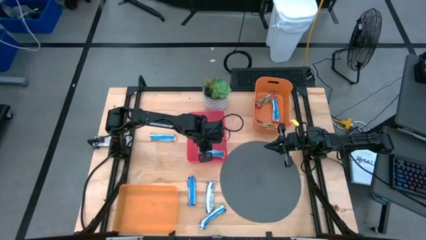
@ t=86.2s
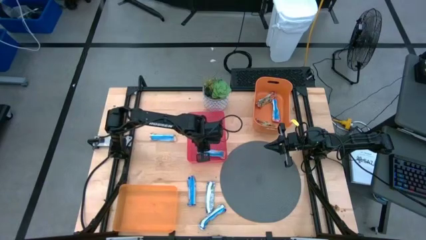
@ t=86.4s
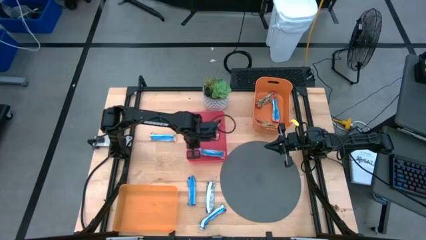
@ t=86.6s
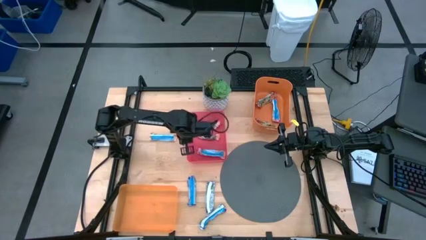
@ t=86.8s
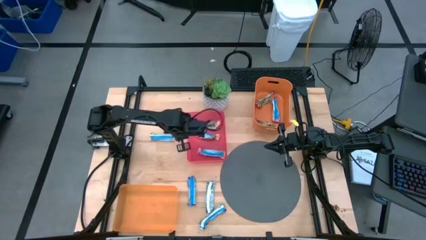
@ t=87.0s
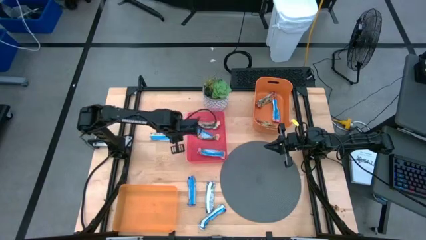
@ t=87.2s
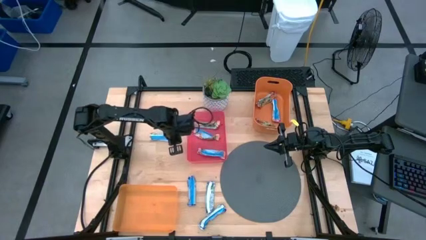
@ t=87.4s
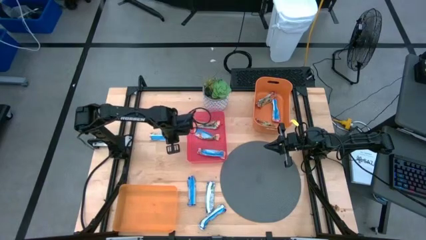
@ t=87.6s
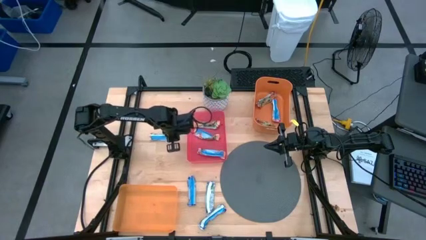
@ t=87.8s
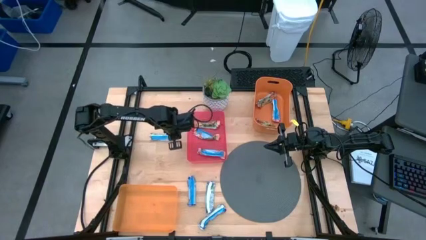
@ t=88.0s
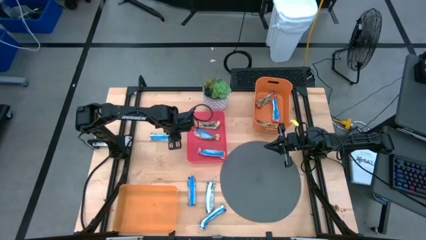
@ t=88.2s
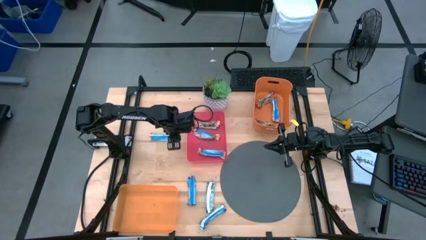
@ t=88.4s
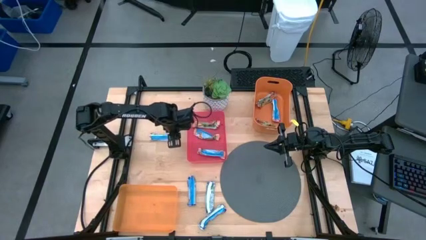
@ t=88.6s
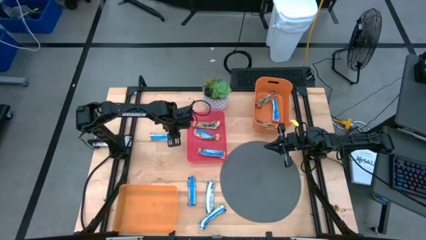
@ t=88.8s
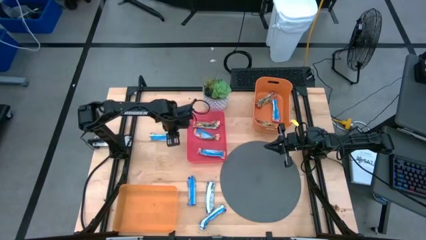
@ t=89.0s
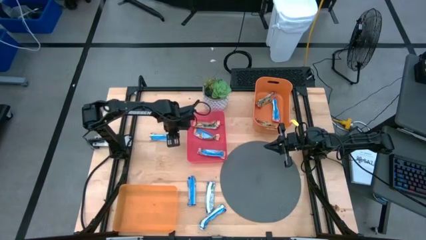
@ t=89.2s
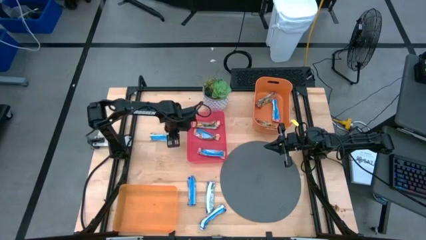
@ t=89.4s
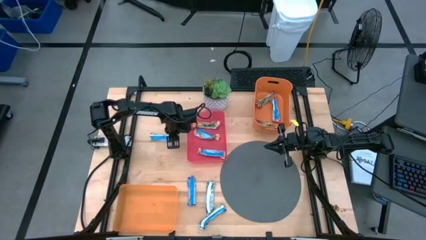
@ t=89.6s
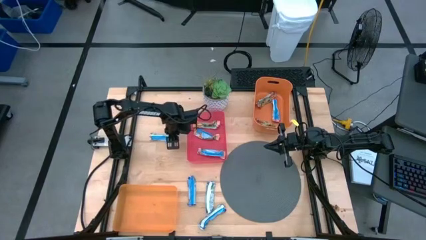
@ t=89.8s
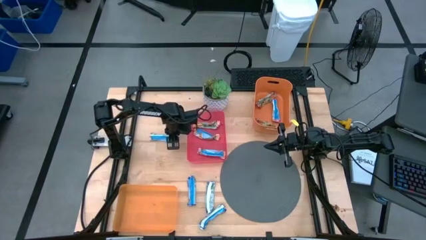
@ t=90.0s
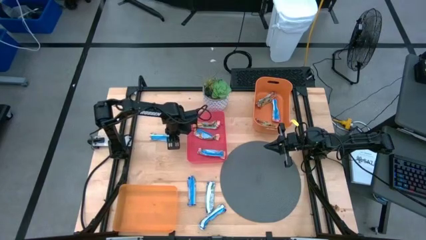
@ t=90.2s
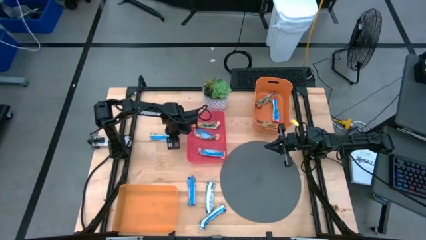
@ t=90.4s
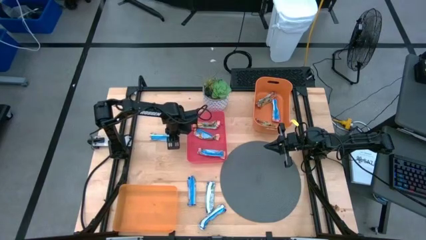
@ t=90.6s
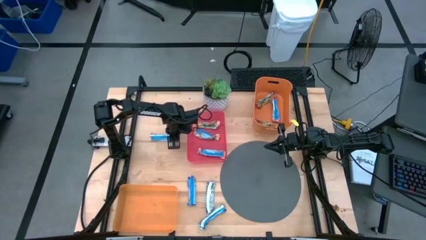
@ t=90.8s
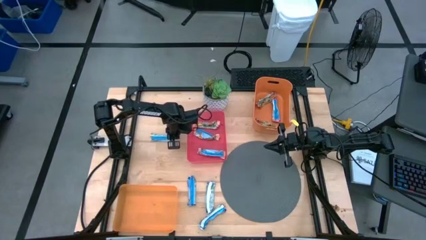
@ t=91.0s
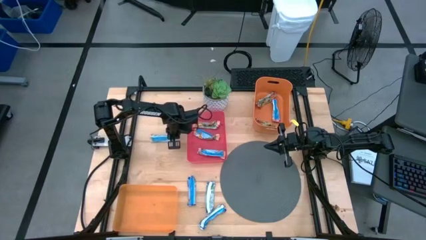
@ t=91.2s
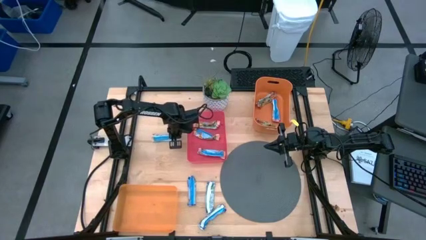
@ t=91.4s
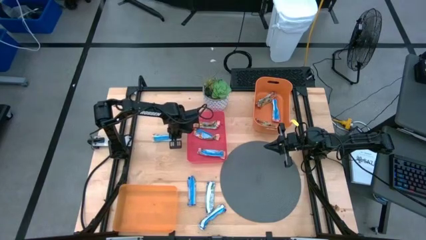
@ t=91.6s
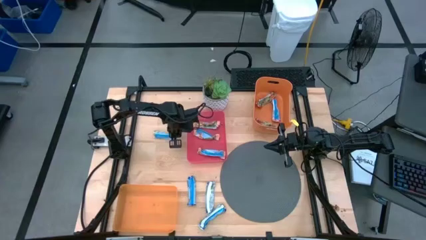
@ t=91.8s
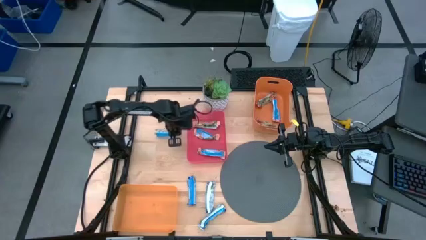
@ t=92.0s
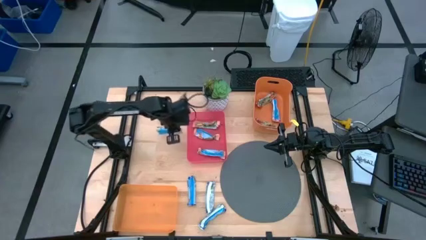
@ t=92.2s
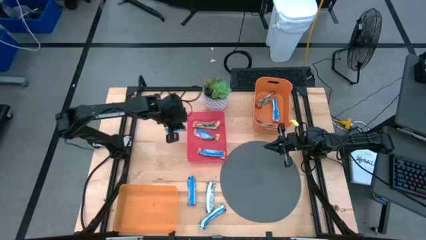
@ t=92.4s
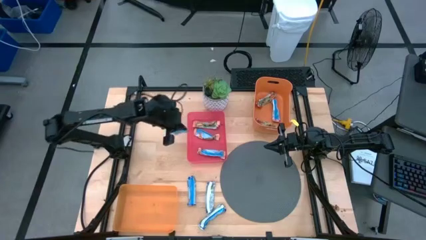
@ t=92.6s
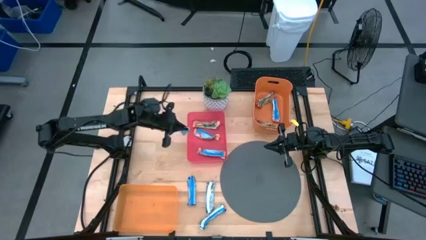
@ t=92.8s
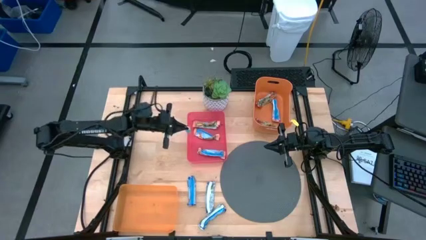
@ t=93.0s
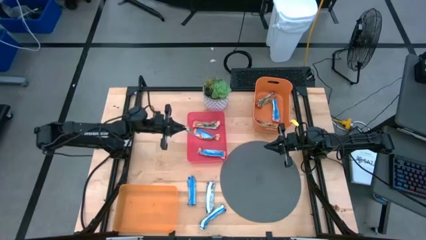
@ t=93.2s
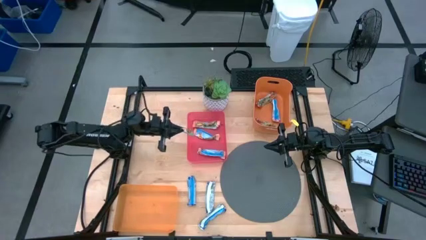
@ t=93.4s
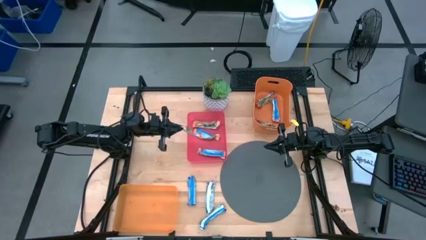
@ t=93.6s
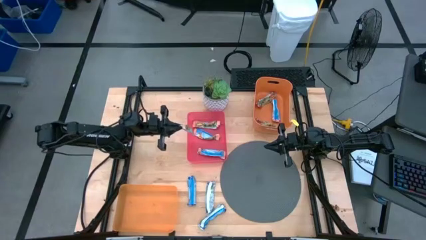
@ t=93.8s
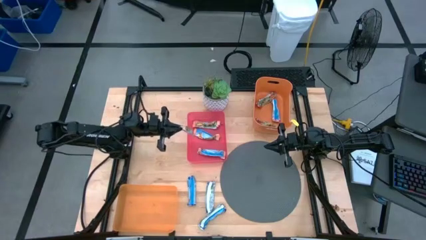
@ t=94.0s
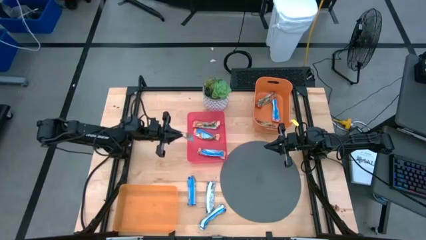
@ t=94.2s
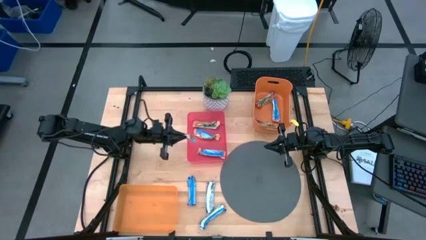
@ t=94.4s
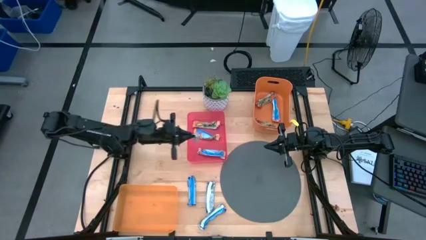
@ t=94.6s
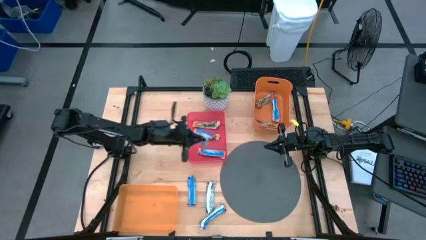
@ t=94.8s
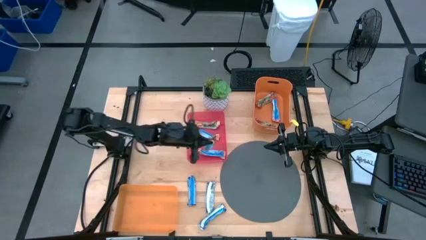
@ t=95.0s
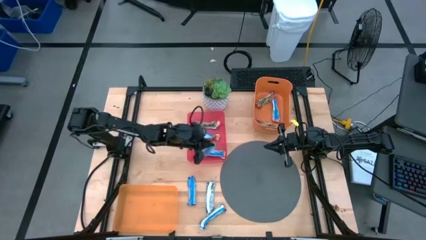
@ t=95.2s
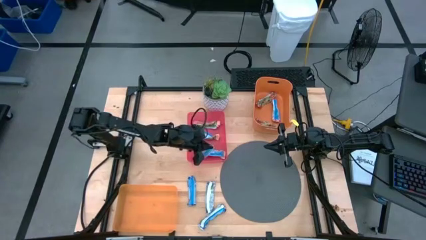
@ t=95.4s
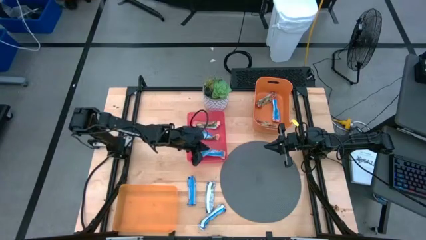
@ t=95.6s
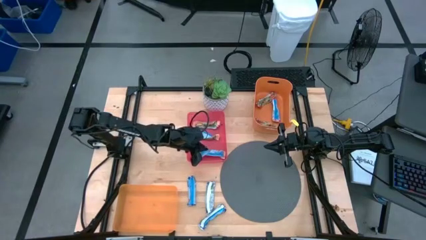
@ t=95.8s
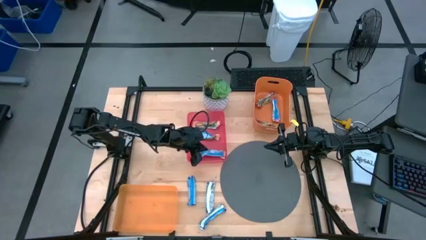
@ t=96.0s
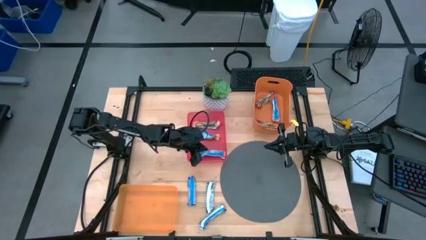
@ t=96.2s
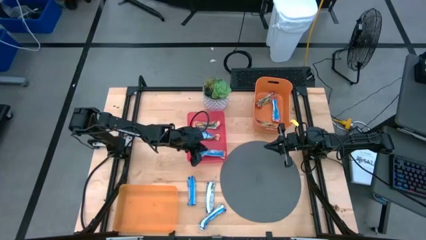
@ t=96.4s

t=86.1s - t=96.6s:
Task: Pick and place Granola Bars by type
Put the blue/orange granola bar into the pink bin

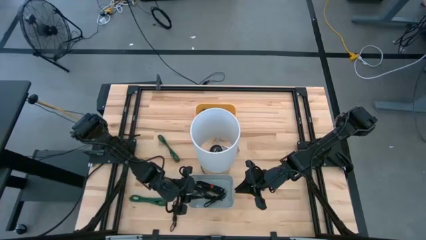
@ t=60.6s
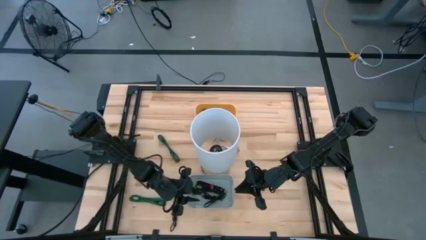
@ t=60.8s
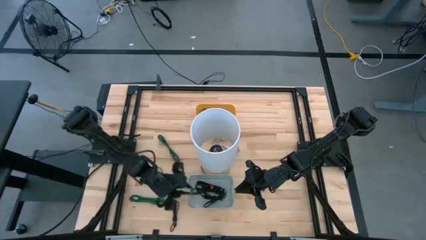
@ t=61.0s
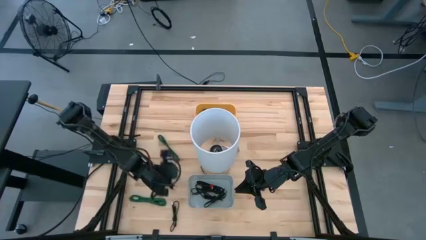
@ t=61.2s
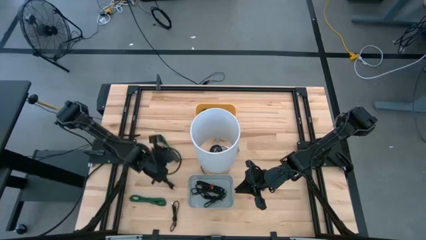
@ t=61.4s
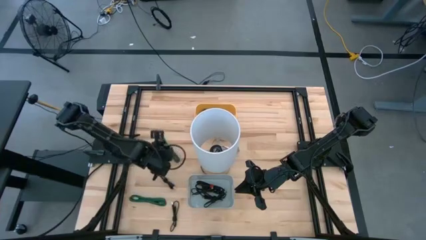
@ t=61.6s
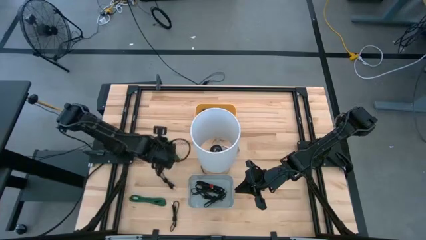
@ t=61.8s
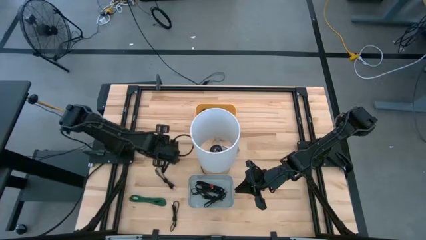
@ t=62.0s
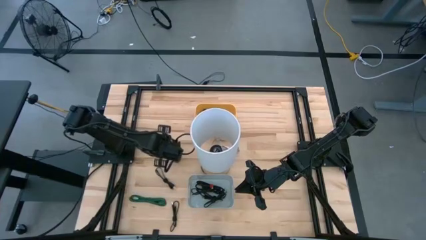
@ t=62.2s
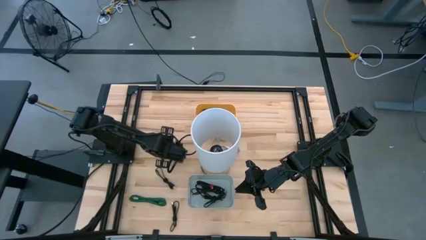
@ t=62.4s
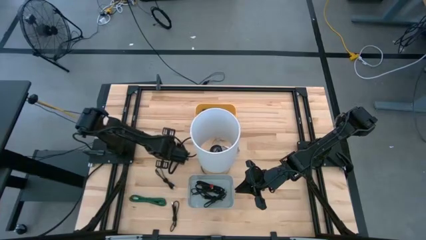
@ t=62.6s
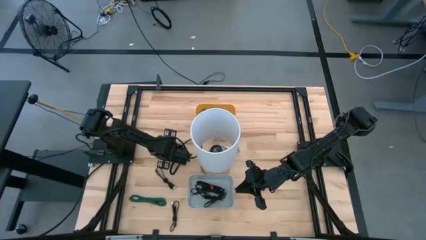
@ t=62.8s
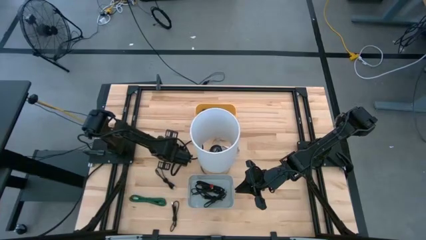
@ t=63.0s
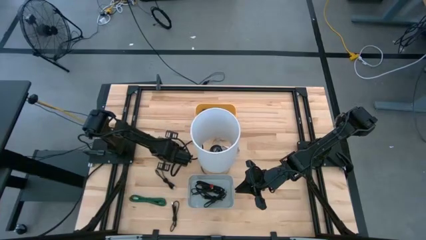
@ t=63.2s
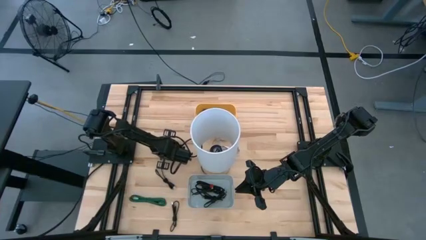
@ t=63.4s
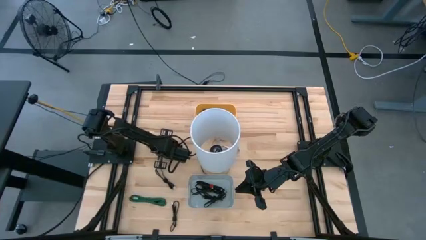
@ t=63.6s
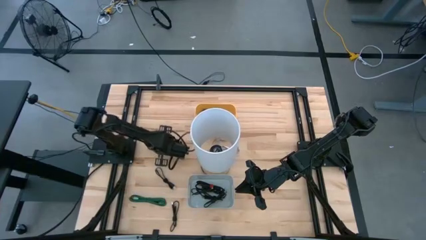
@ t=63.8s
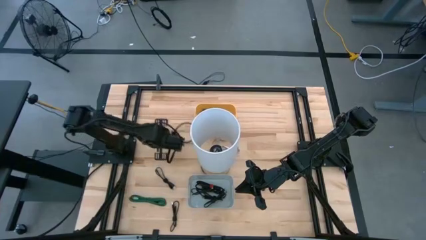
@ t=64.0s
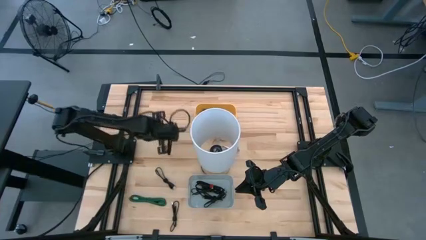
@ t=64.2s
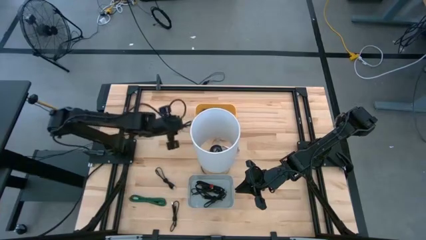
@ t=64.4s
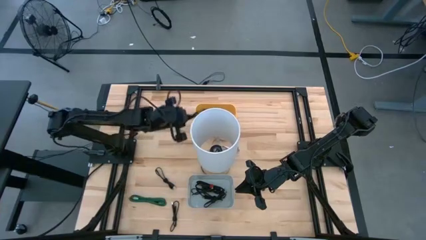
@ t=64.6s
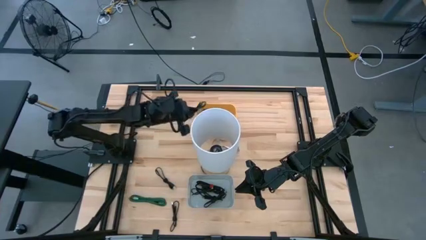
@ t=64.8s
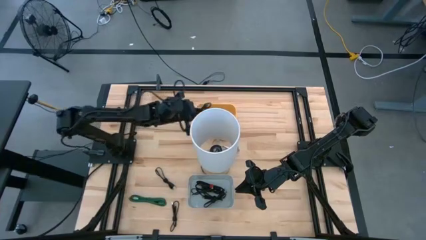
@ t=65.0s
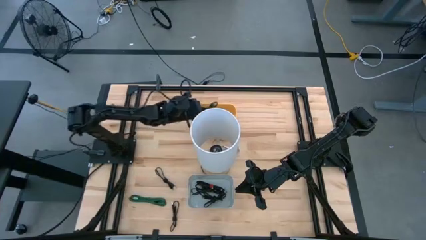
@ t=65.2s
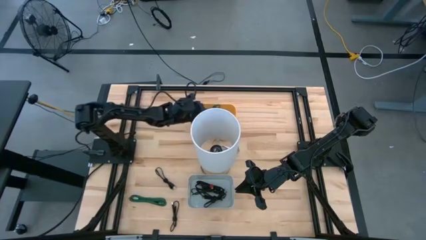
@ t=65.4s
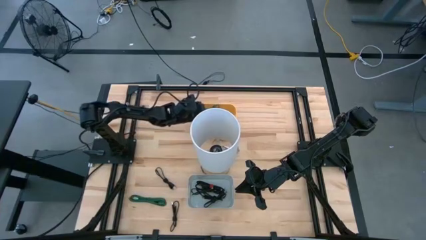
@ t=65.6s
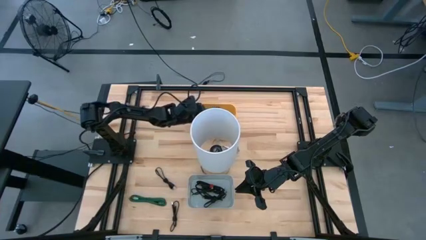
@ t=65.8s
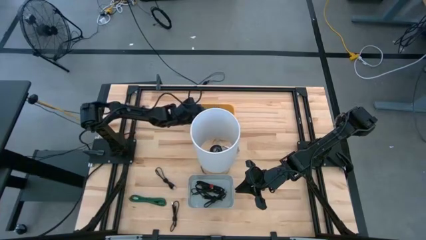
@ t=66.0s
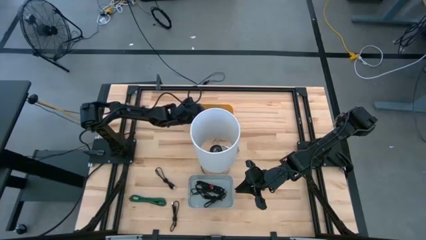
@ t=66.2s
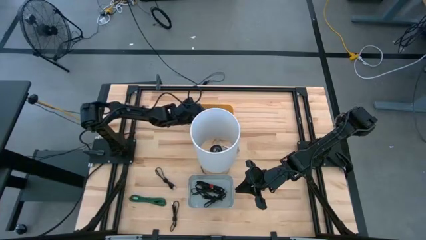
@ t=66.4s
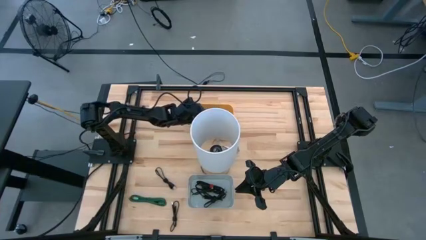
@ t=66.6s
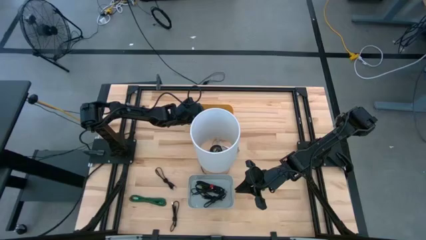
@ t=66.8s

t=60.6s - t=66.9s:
Task: Pick & Place USB Port
Put the green charger cable into the yellow bin
